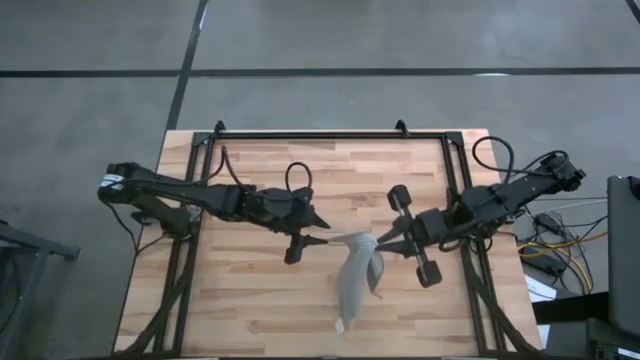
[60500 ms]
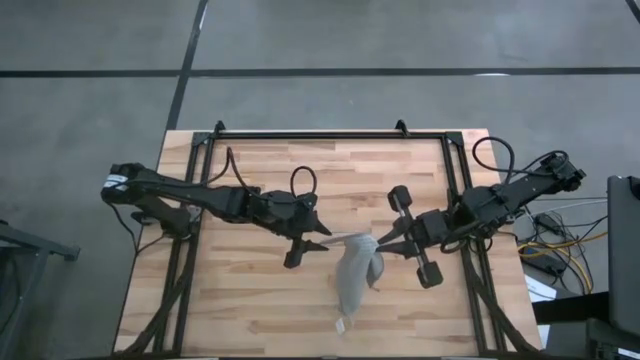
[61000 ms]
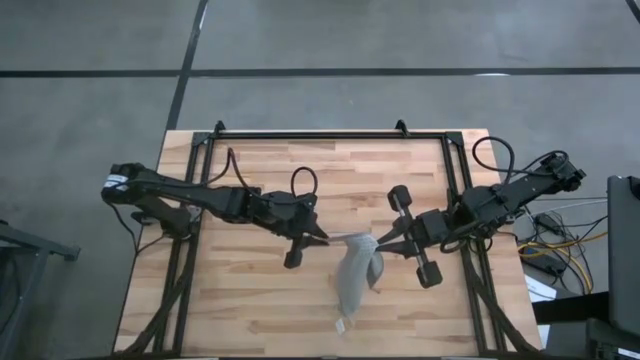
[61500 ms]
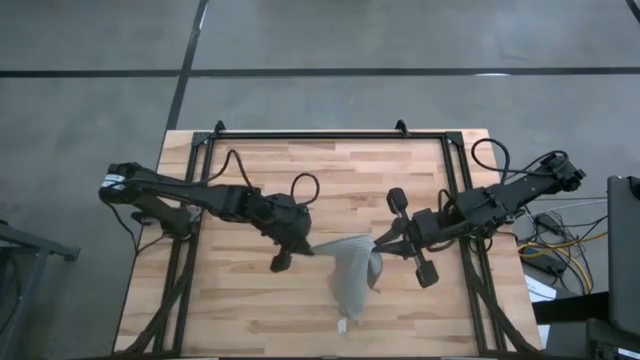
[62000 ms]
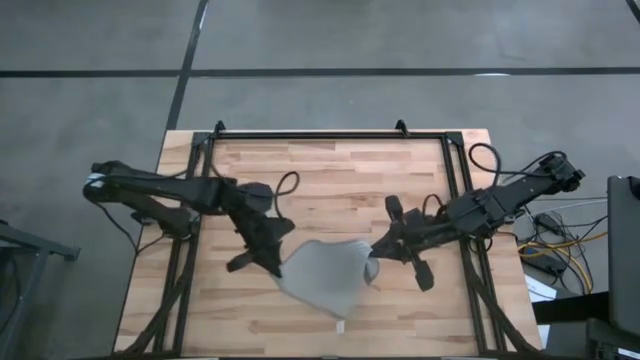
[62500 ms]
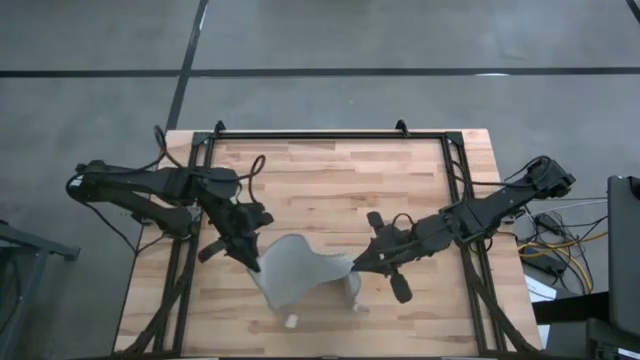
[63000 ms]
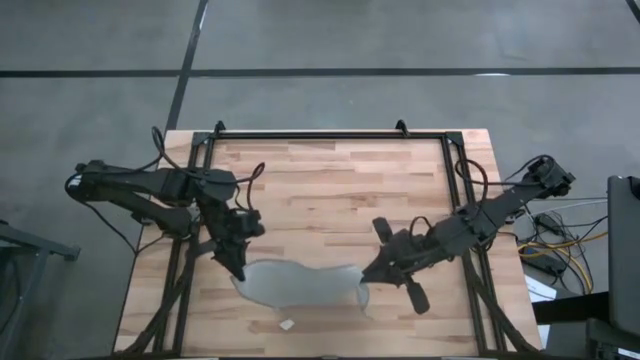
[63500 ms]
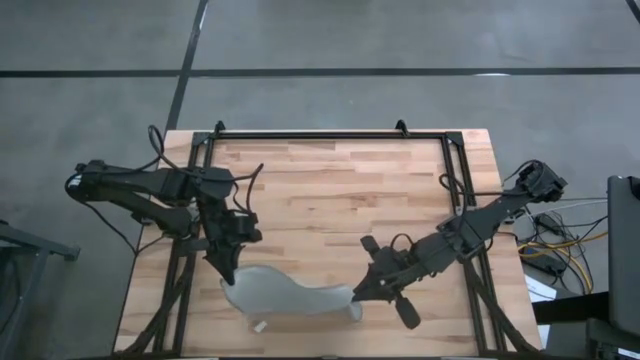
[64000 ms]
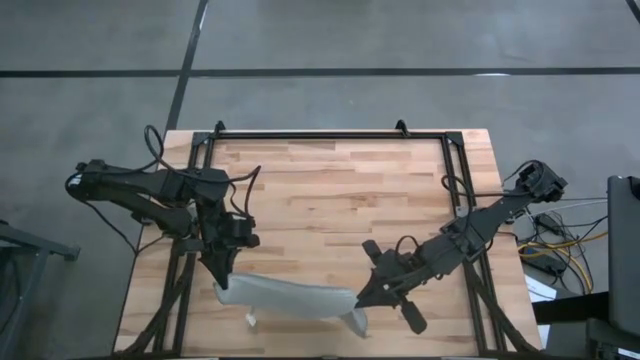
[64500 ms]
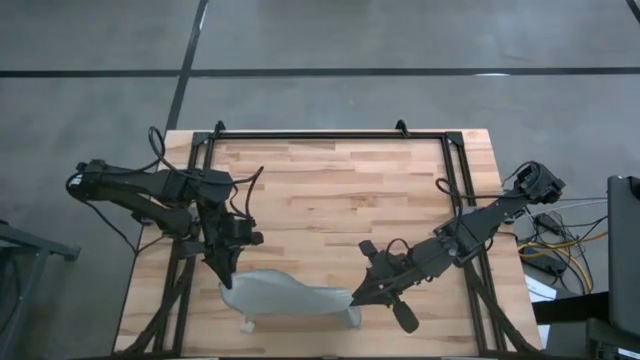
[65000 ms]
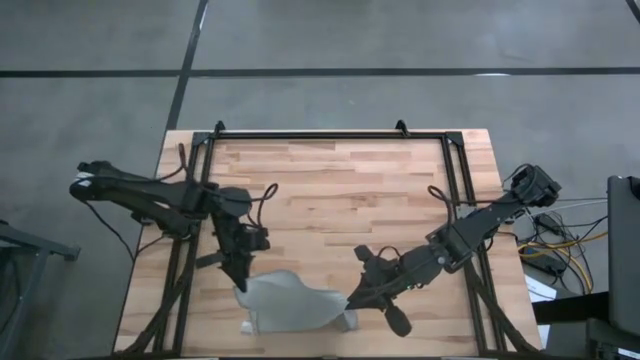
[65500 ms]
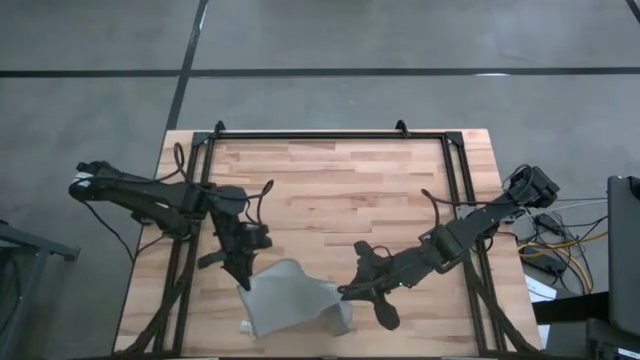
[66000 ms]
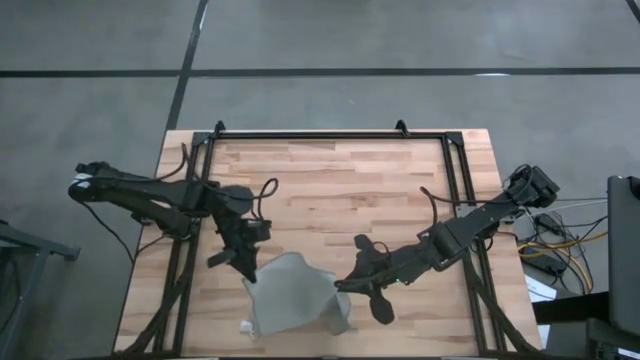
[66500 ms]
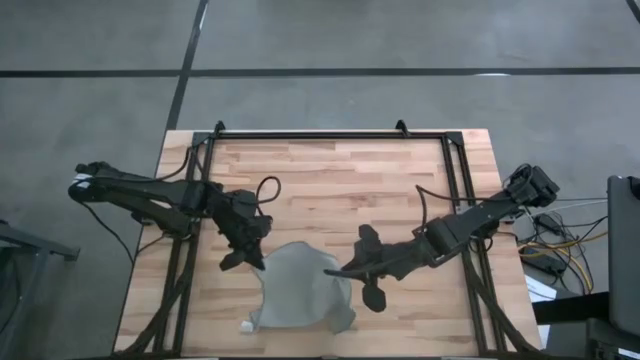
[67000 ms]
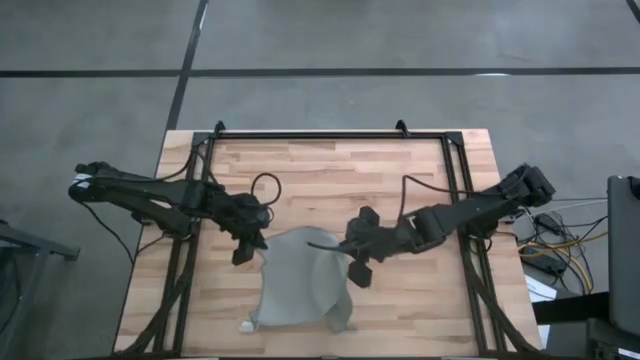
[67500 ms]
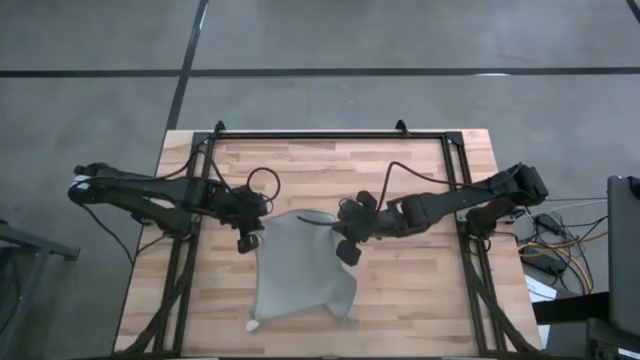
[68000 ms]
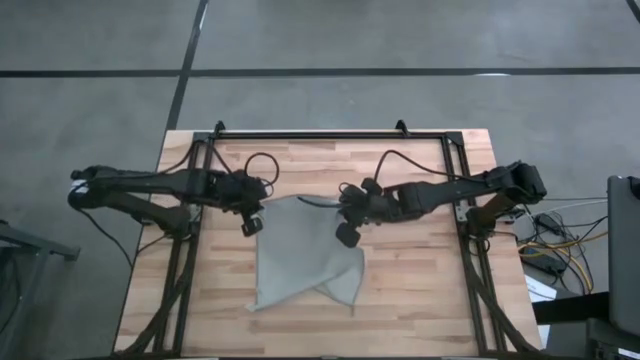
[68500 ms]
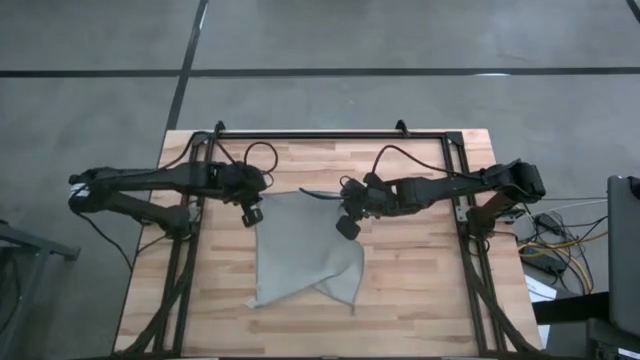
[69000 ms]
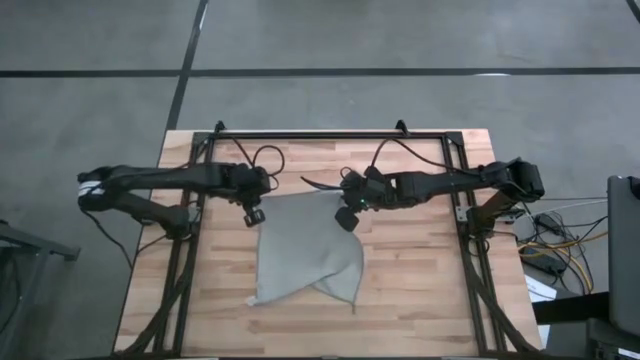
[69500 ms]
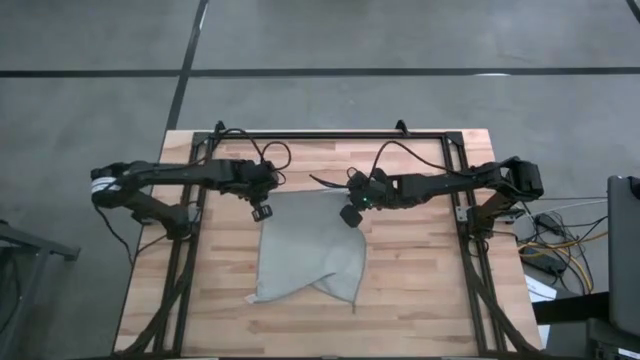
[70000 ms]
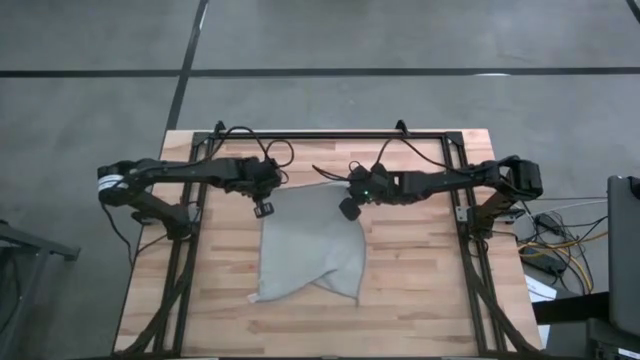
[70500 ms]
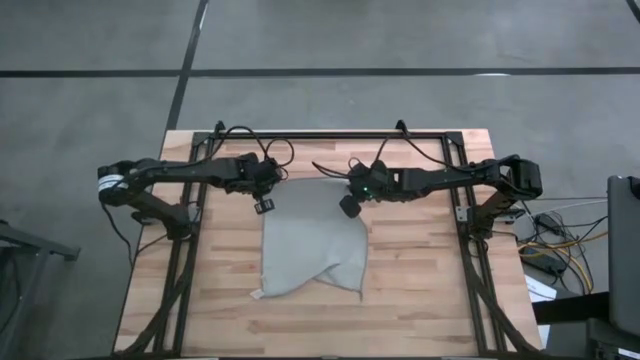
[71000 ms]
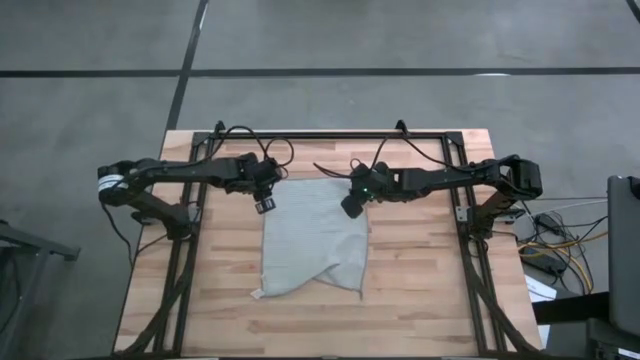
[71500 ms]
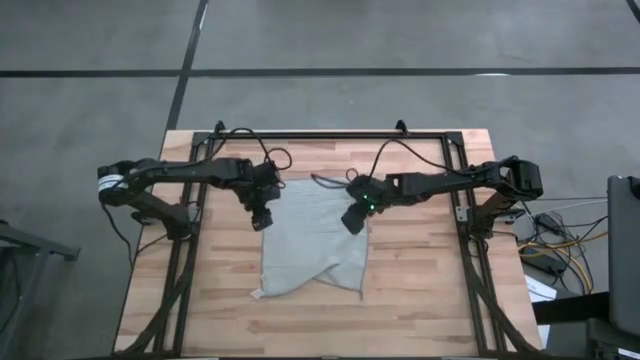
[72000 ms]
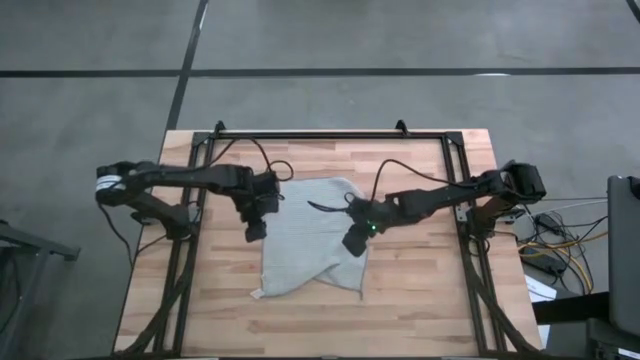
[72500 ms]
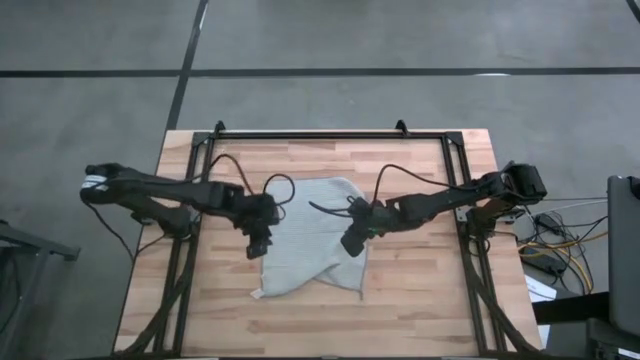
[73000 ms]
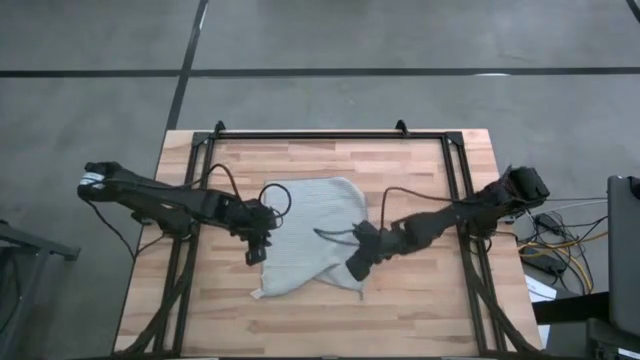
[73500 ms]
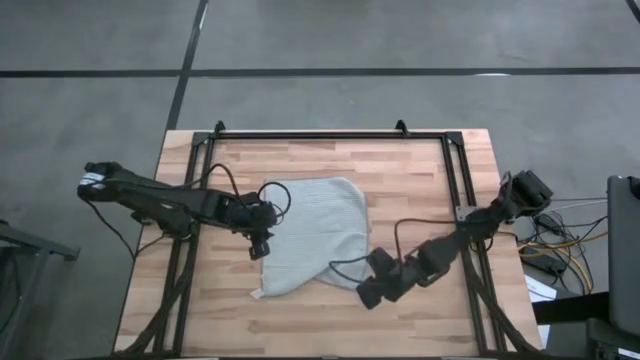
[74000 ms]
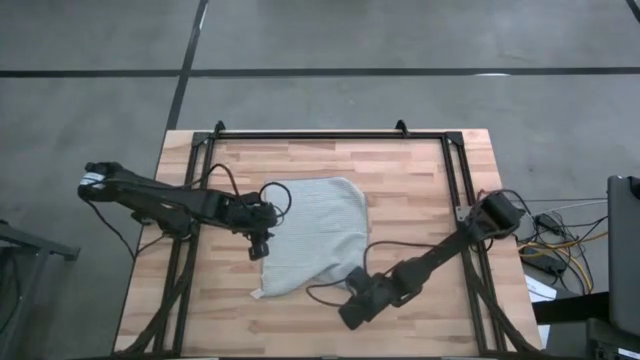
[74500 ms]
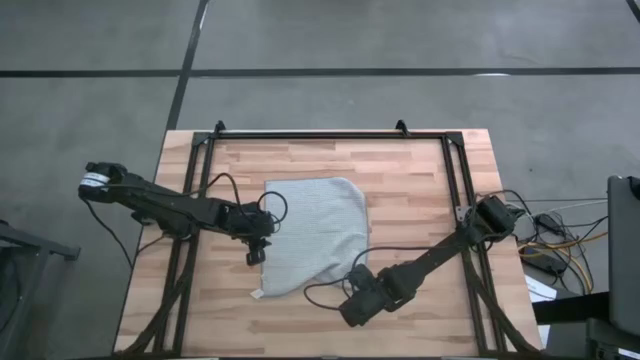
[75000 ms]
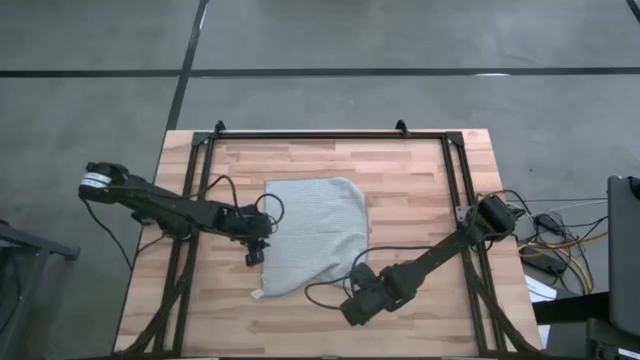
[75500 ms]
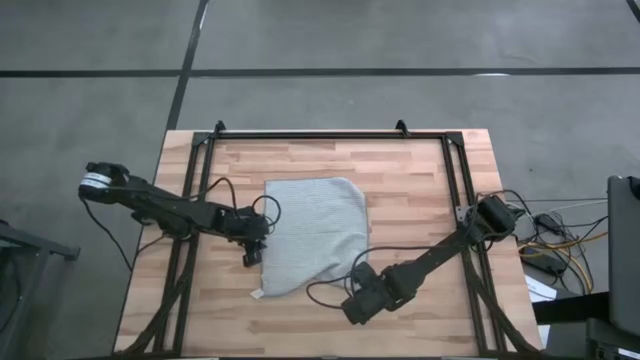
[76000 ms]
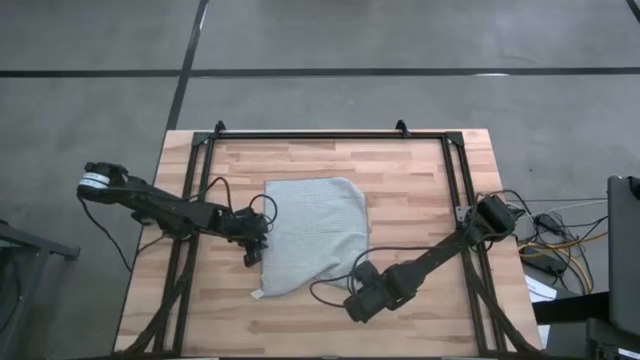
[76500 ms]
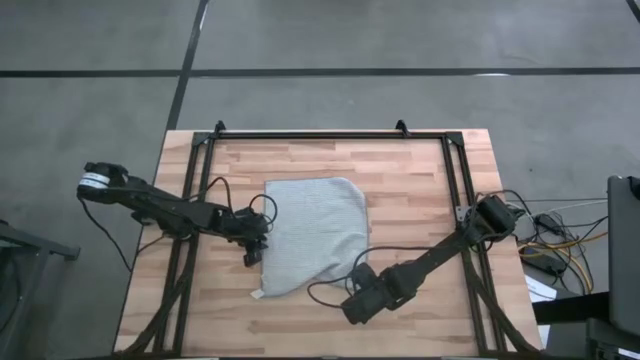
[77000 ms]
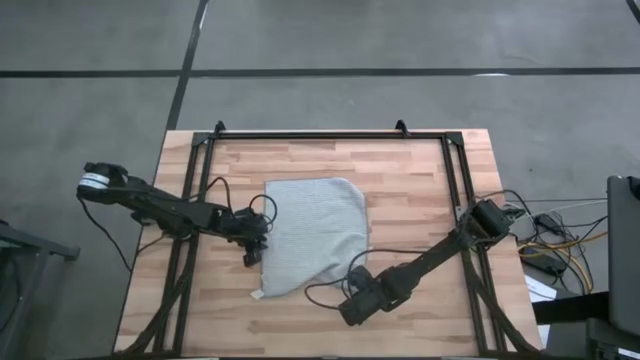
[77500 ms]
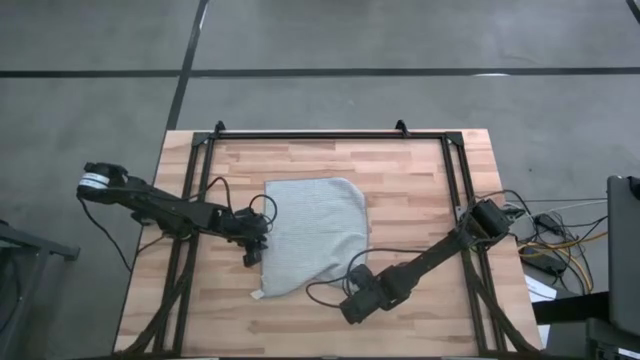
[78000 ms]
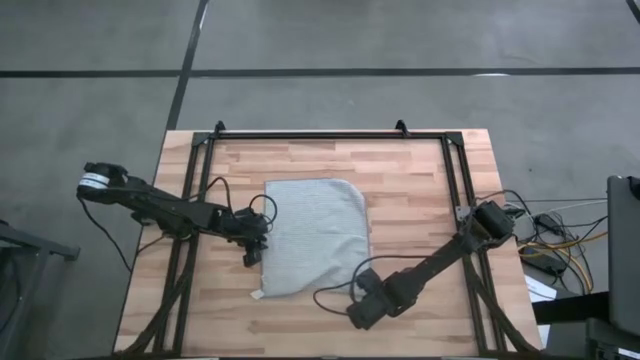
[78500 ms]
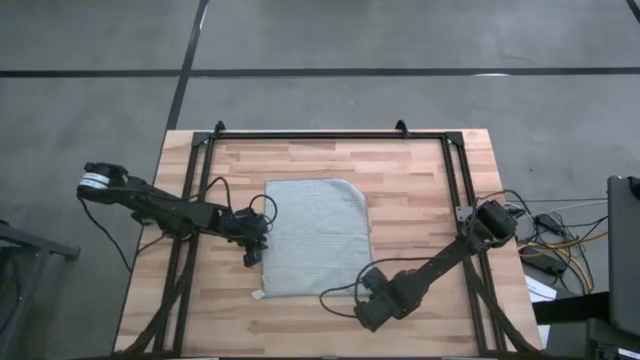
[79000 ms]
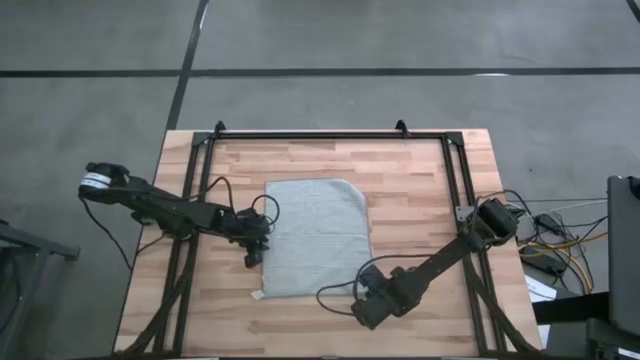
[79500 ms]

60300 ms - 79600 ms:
Task: Fold microfiber towels
Prepare the microfiber cloth on the table
